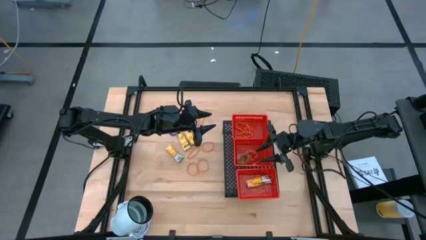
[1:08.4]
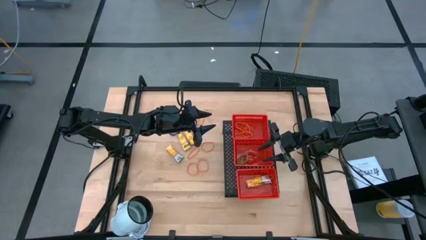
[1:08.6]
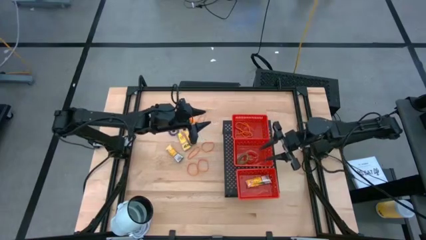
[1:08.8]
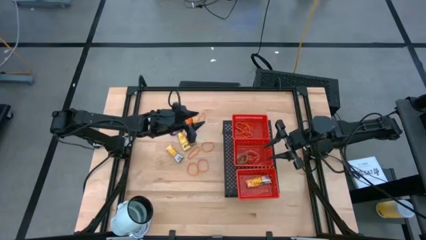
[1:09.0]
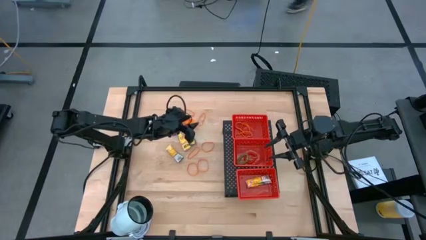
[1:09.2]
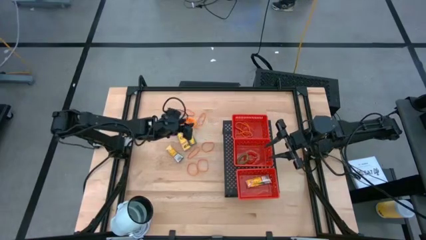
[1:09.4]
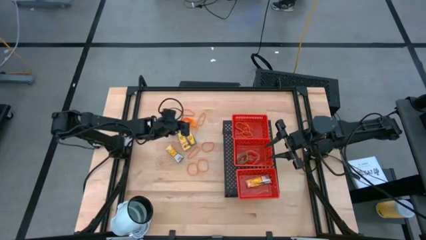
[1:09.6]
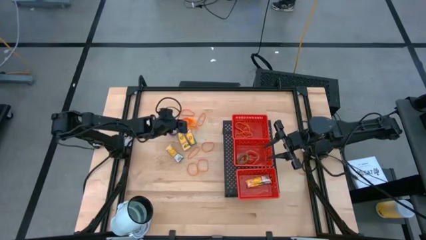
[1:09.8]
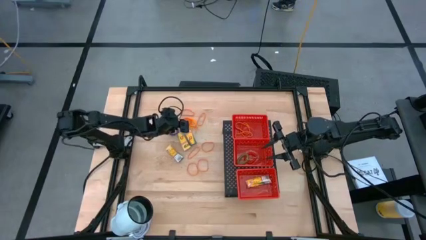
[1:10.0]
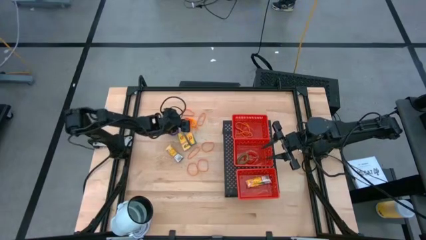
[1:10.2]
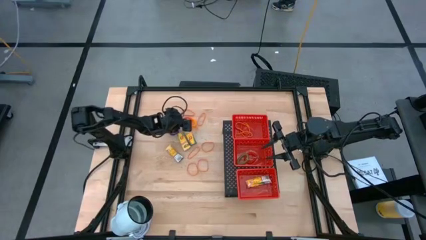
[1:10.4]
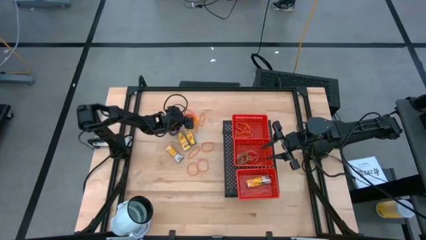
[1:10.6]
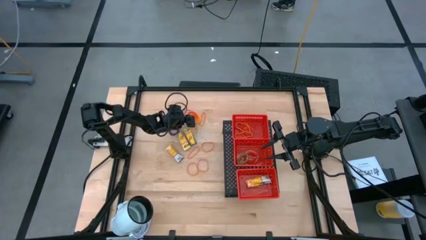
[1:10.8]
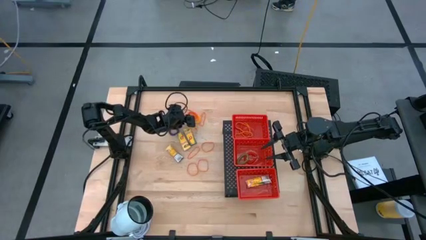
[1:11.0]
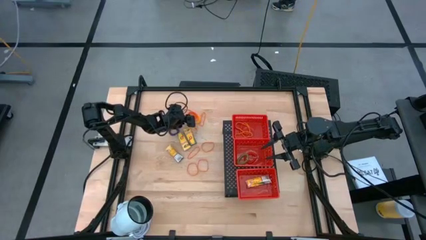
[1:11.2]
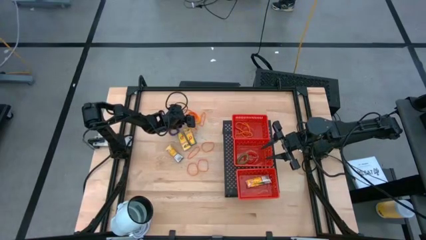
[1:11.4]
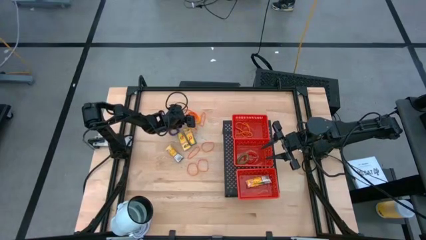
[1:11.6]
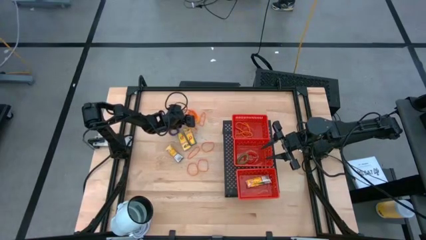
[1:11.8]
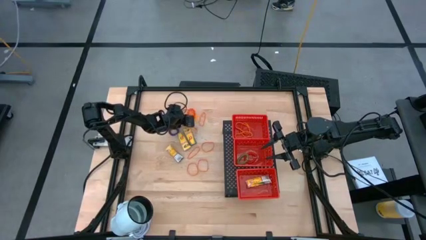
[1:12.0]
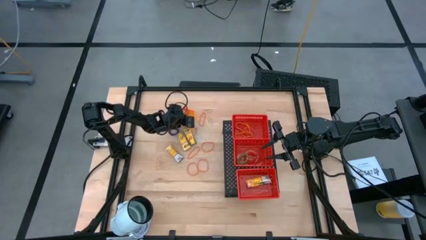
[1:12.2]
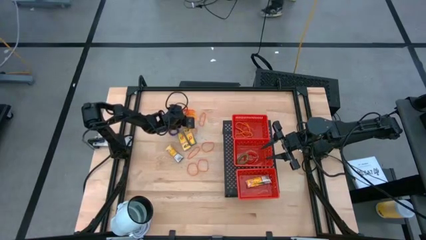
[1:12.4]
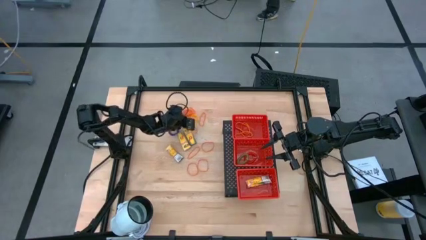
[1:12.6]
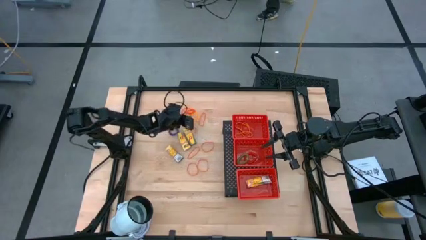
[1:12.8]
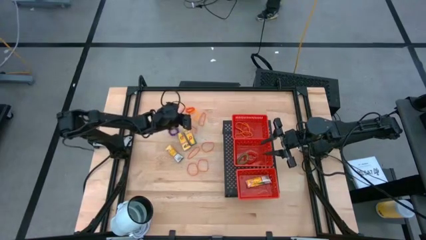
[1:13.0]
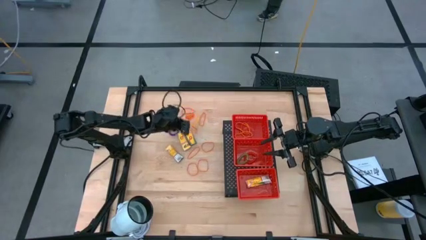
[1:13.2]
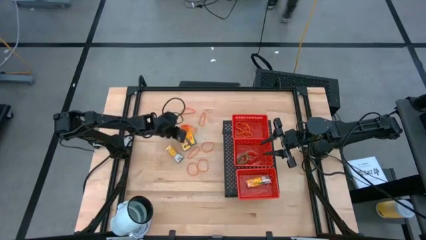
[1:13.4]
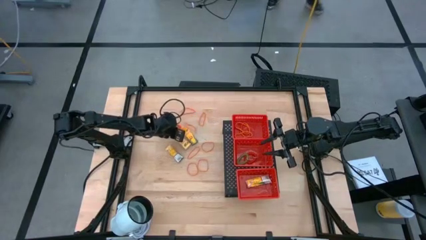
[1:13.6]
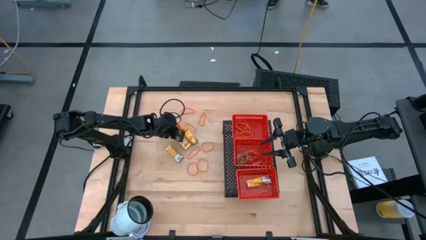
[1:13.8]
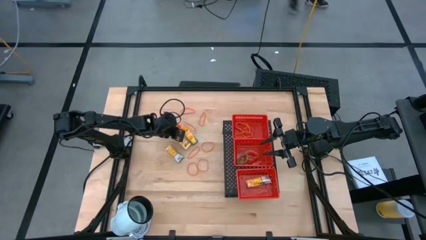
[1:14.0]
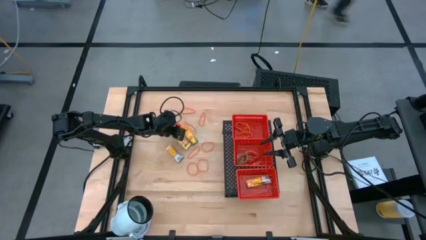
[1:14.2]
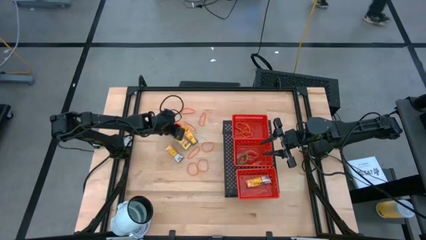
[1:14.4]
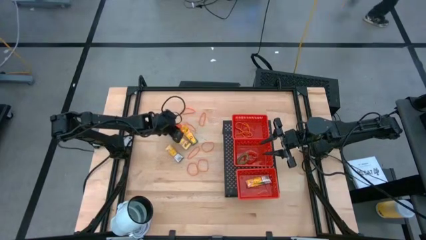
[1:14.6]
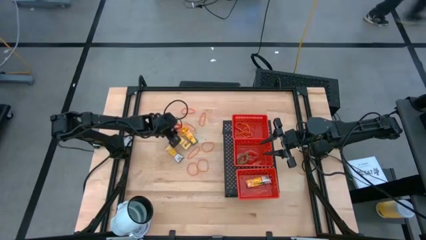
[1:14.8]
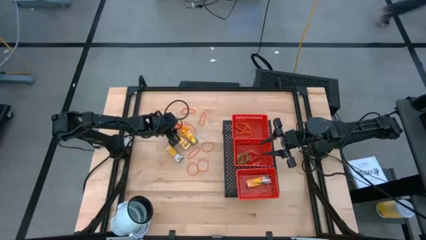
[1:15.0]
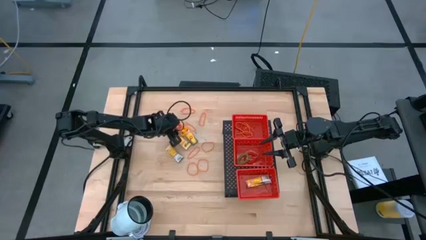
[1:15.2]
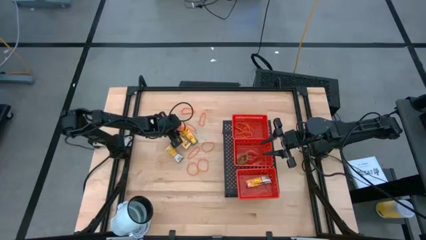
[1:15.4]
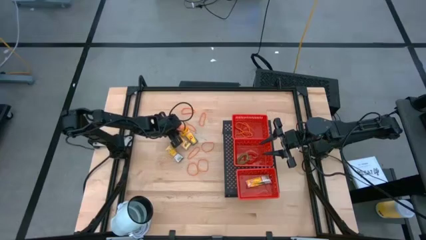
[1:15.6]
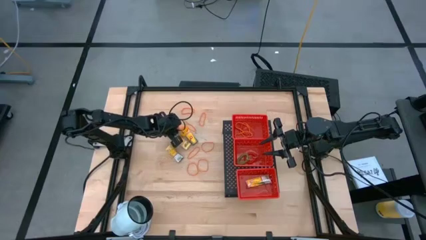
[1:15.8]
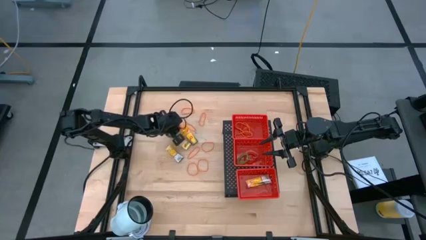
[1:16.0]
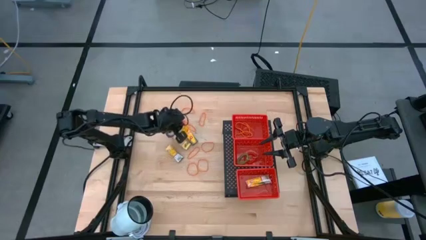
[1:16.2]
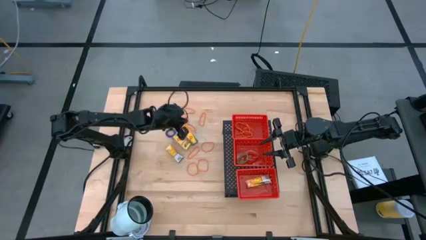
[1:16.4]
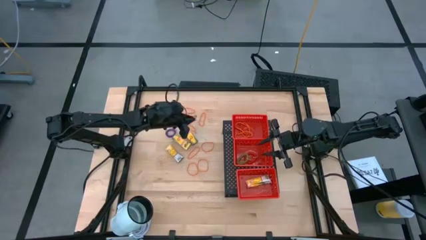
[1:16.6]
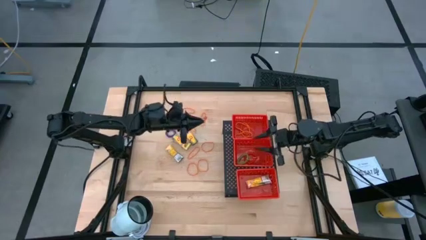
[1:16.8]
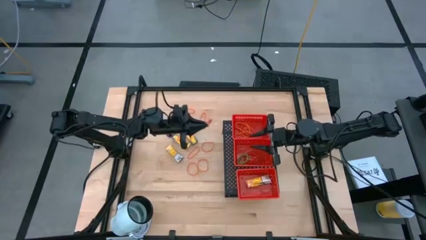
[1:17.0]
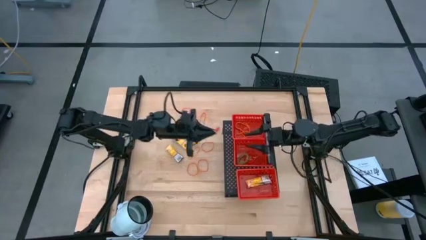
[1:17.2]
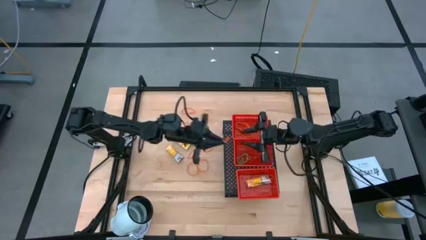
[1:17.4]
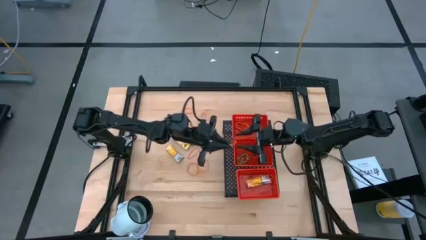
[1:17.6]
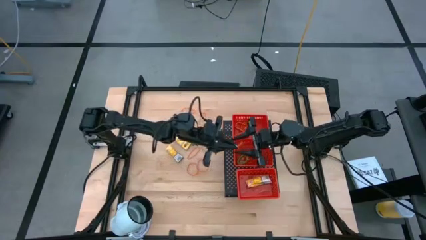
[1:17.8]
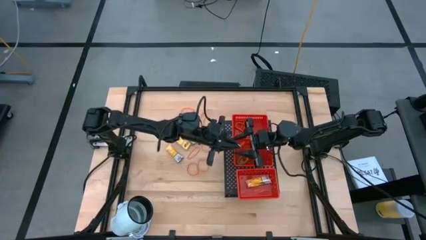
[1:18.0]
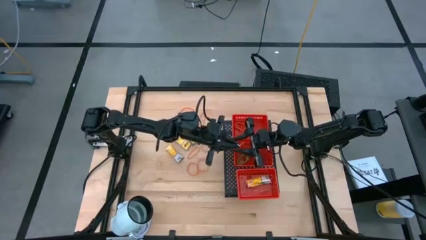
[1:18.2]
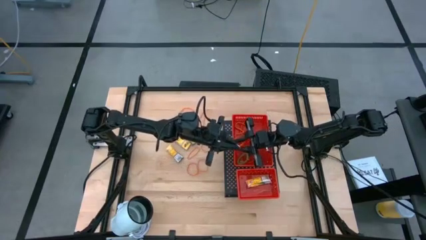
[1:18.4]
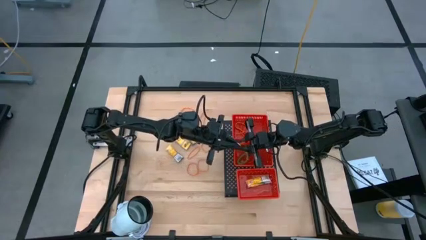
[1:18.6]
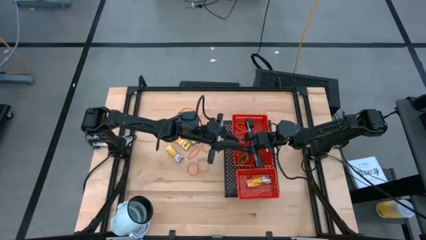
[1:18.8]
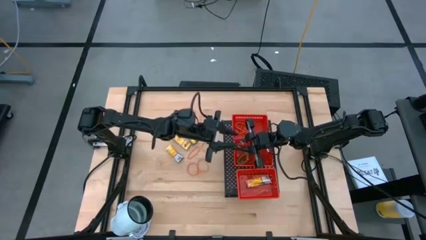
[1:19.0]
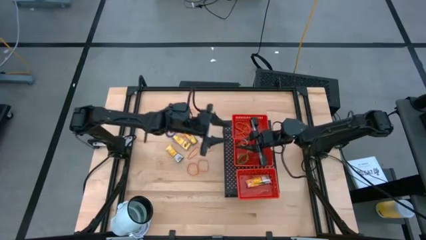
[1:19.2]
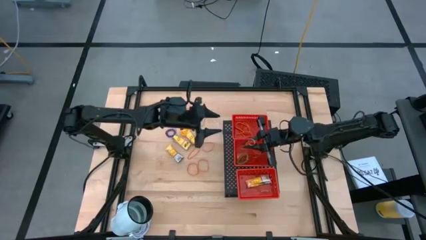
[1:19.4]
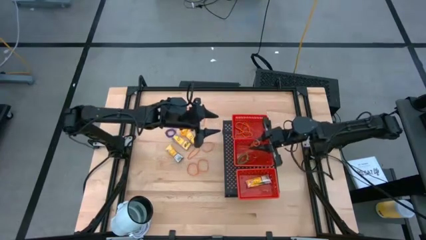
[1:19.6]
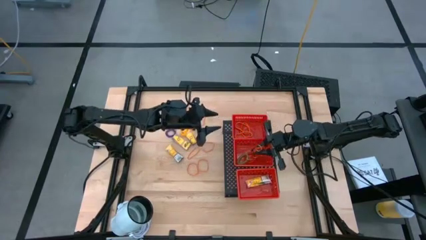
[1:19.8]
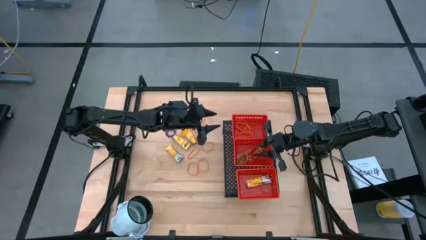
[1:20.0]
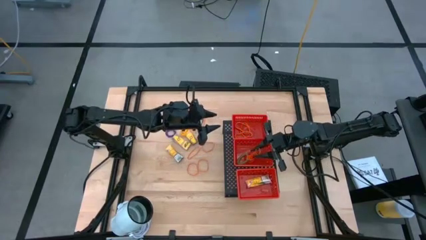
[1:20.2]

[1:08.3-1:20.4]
Task: Pick & Place Office Desk Supplies
Put the orange spring keychain into the middle red bin on the shelf

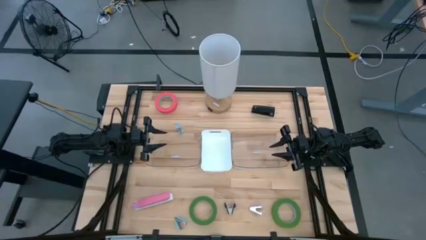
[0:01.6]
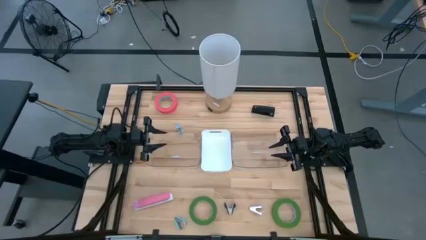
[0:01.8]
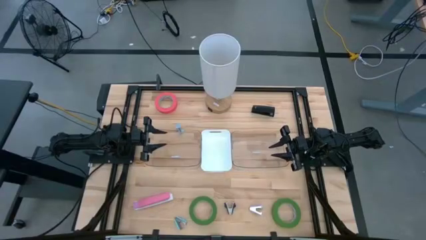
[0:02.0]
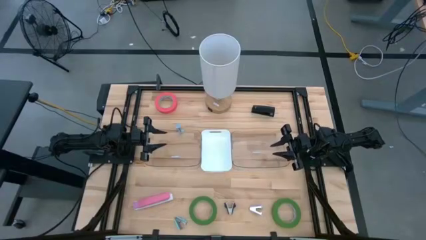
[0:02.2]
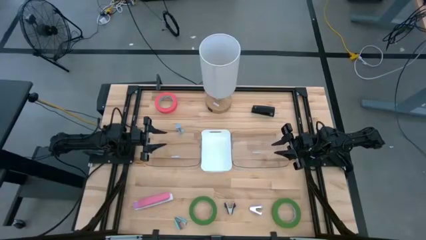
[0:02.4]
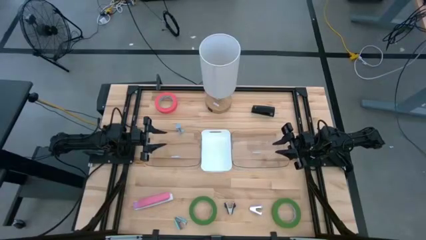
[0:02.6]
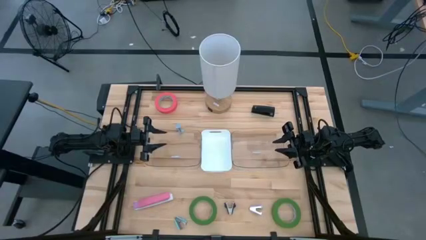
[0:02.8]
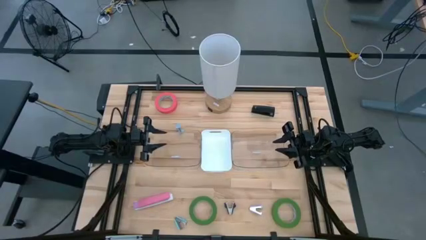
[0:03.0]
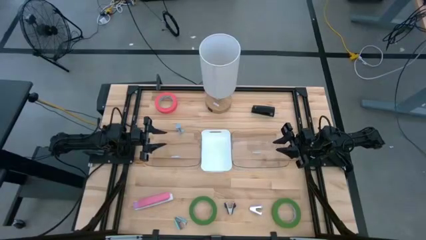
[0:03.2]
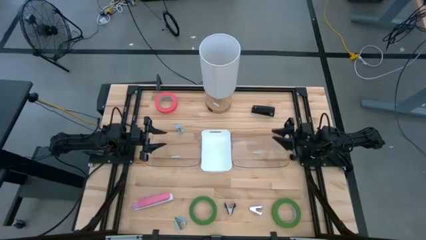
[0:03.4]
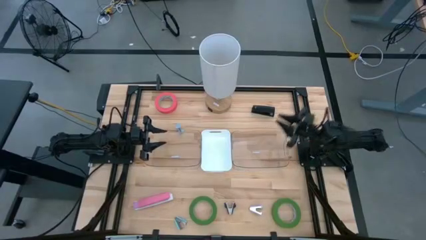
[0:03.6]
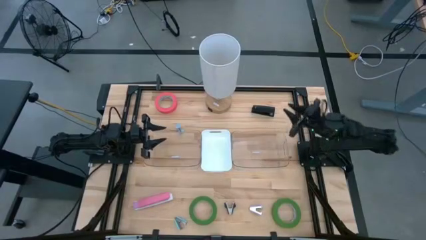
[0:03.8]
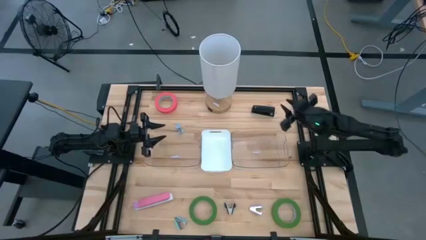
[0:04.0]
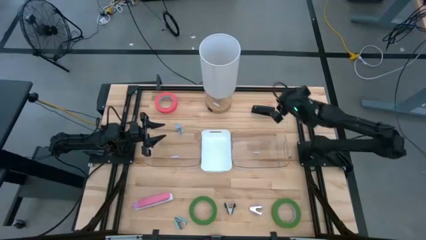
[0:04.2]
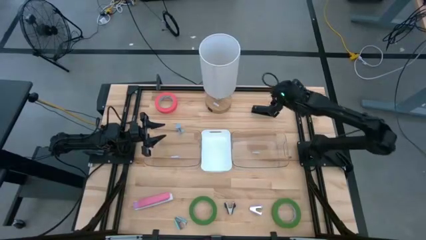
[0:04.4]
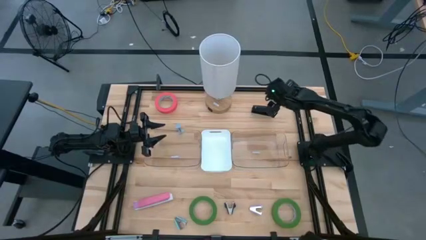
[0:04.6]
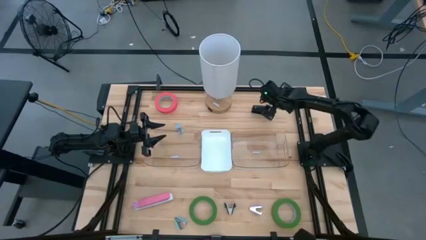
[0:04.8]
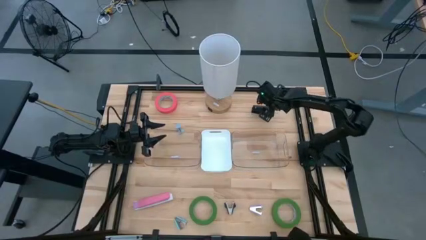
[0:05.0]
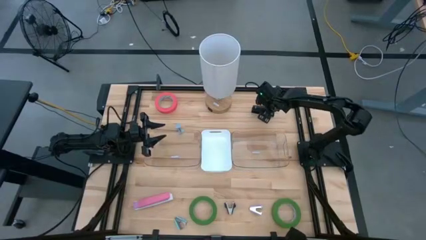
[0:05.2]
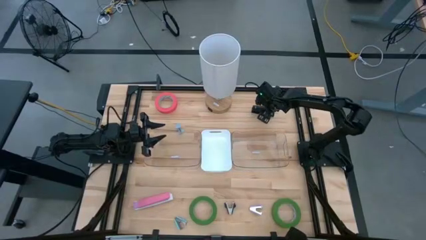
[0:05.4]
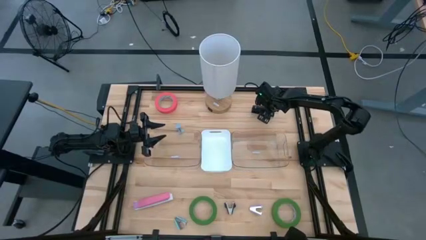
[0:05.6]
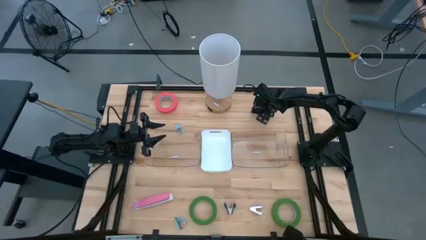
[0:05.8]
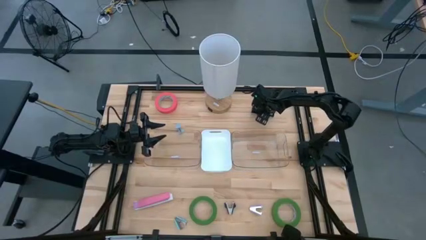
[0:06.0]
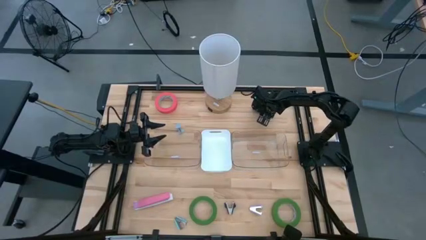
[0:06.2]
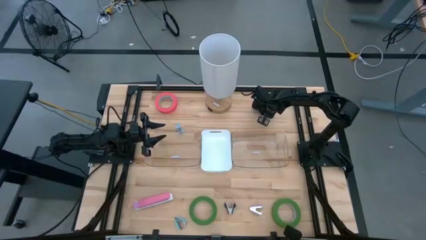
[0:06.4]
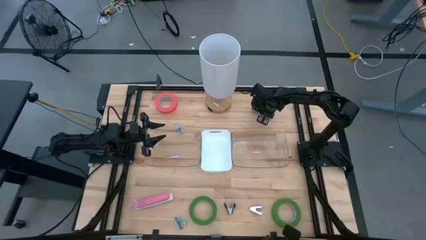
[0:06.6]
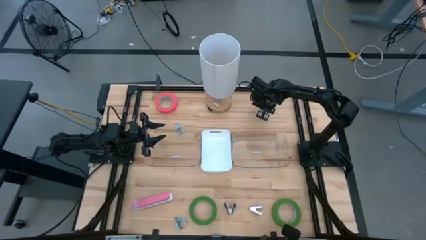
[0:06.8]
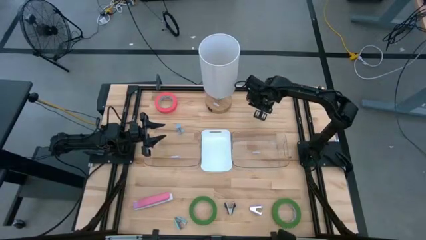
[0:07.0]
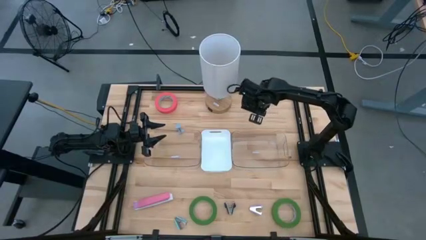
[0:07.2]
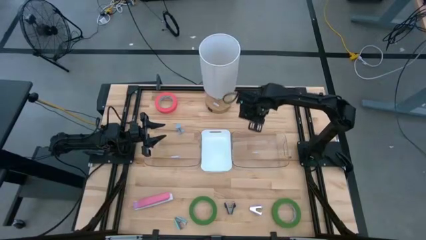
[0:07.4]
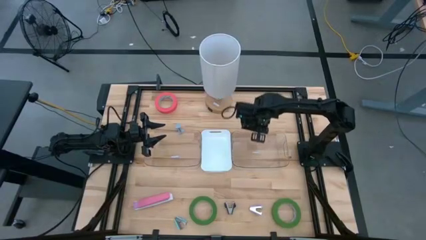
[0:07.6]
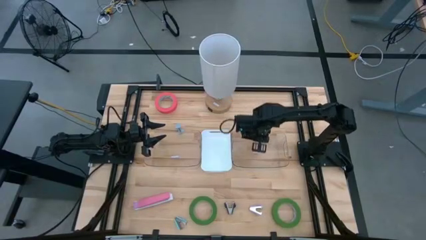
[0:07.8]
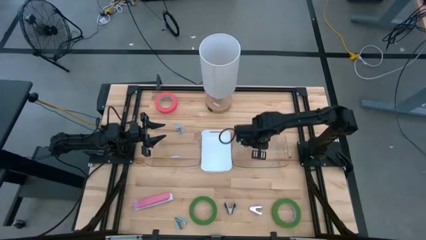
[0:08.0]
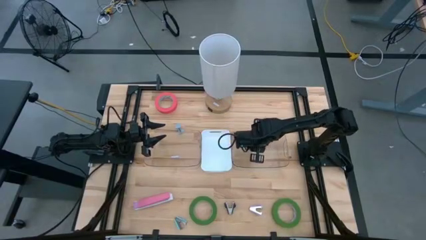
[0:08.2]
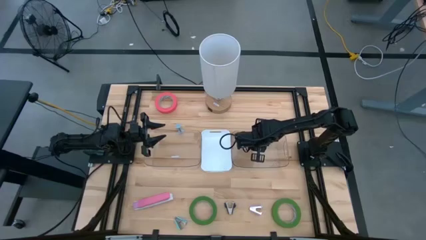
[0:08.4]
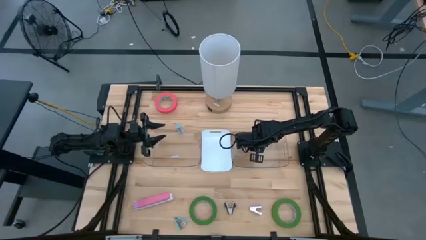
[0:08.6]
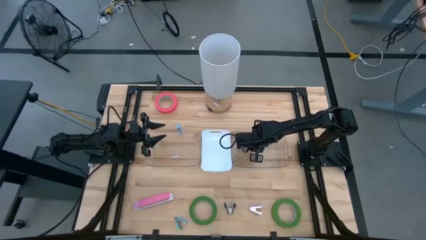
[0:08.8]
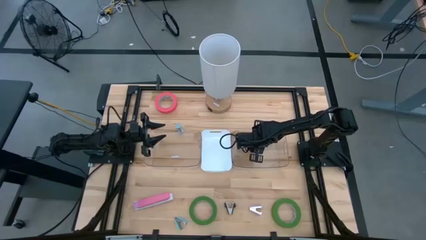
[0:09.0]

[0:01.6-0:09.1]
Task: Pick and place Stapler, Stapler remover, tape
Put the black stapler into the right transparent bin
